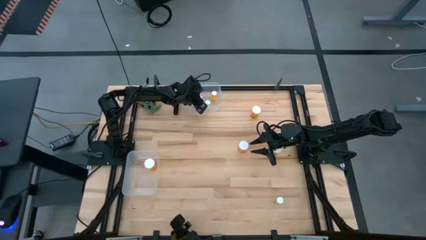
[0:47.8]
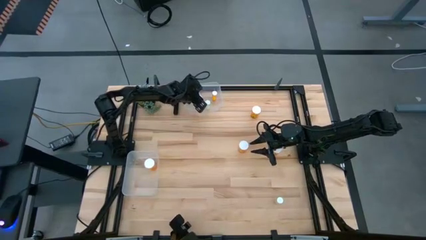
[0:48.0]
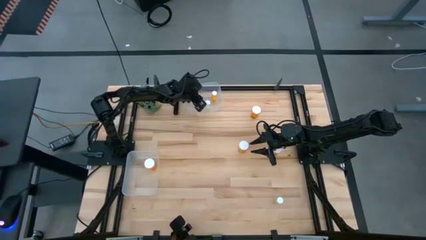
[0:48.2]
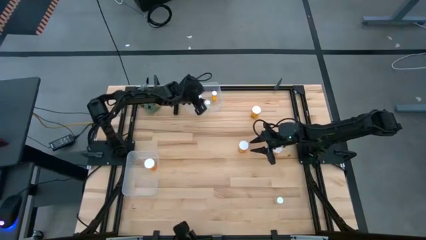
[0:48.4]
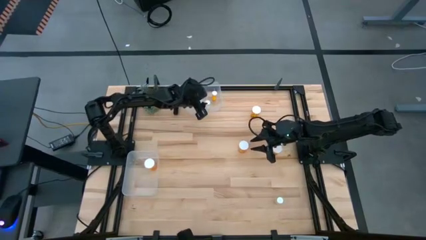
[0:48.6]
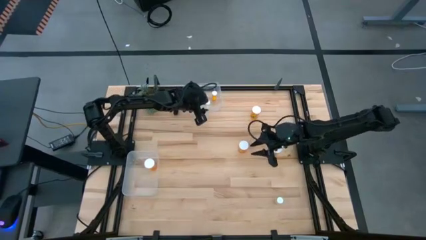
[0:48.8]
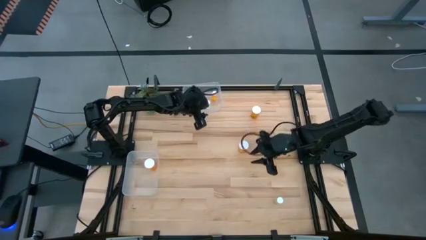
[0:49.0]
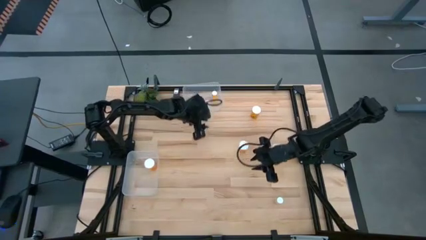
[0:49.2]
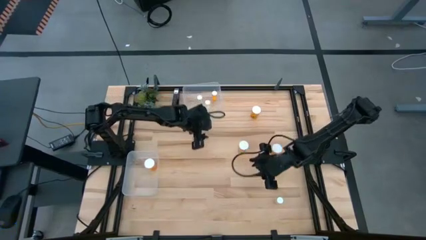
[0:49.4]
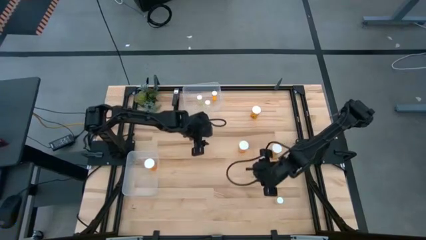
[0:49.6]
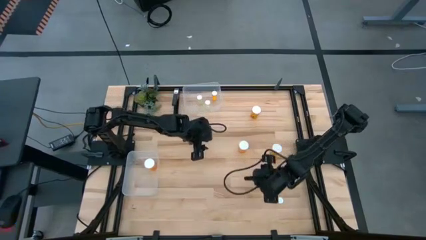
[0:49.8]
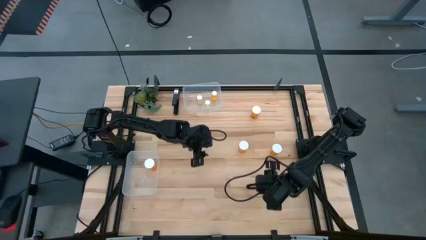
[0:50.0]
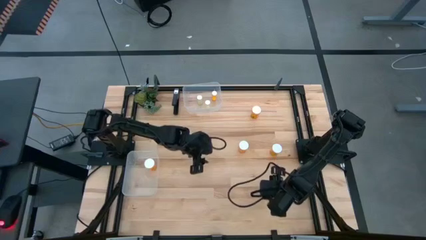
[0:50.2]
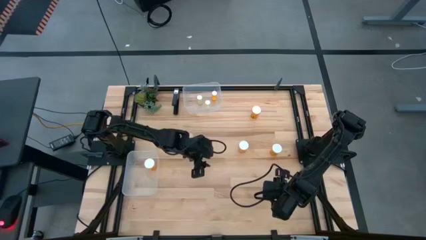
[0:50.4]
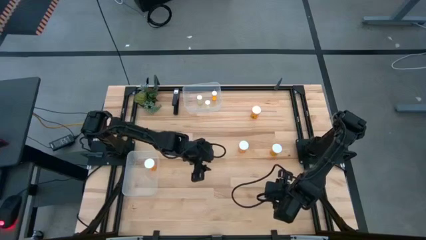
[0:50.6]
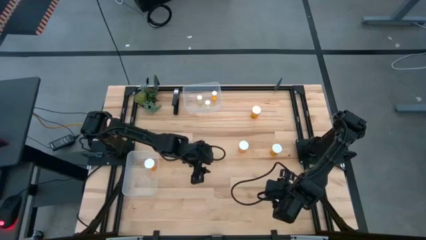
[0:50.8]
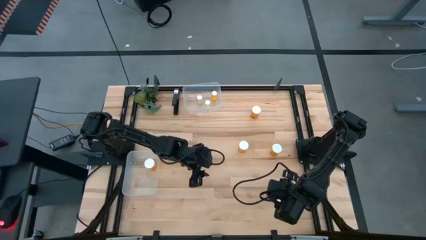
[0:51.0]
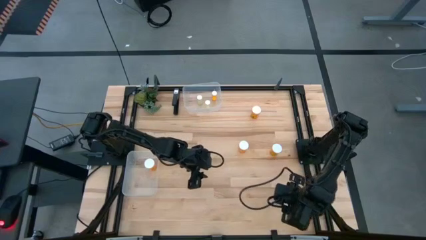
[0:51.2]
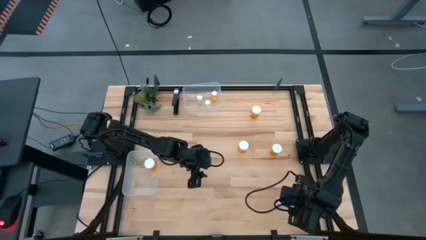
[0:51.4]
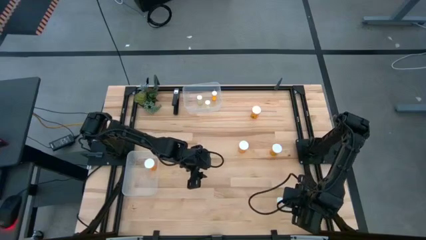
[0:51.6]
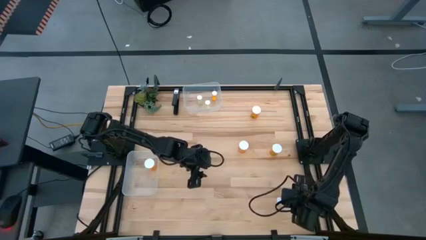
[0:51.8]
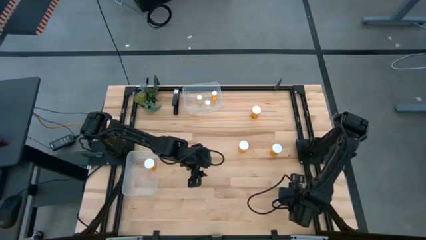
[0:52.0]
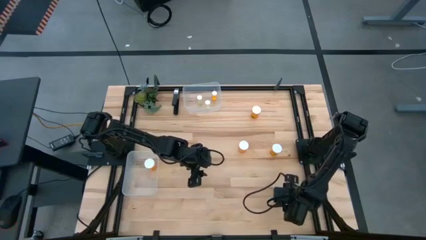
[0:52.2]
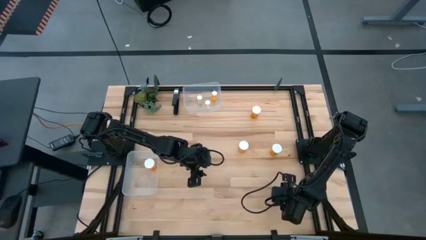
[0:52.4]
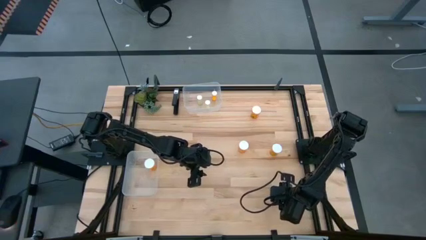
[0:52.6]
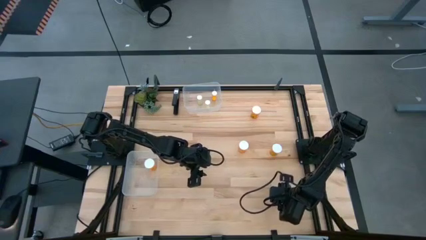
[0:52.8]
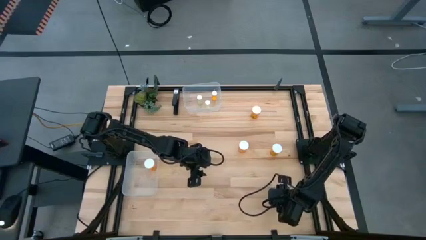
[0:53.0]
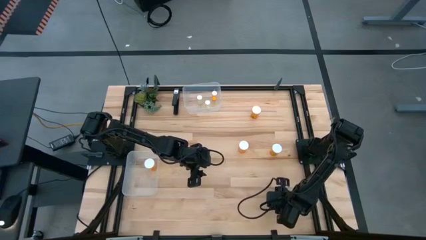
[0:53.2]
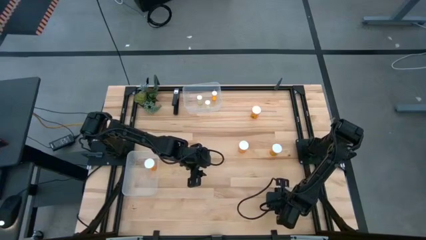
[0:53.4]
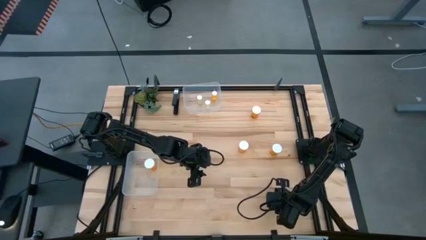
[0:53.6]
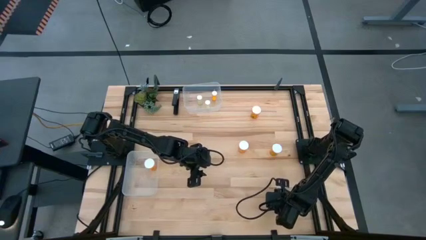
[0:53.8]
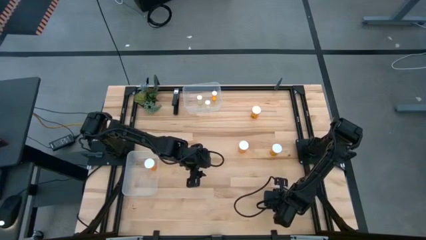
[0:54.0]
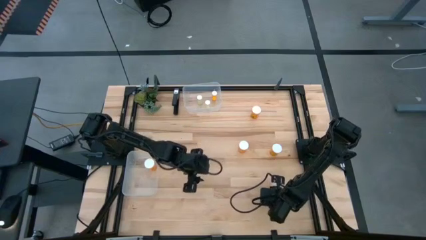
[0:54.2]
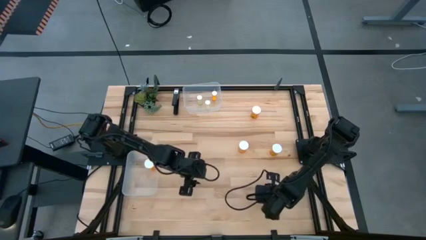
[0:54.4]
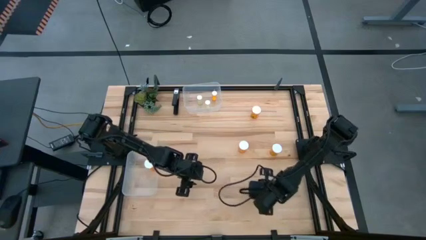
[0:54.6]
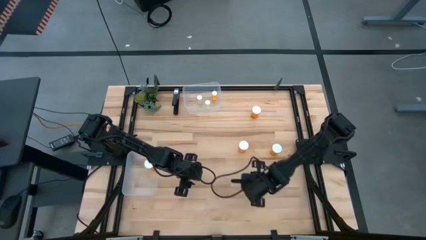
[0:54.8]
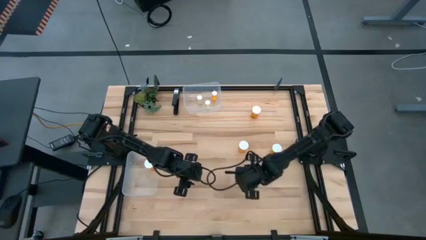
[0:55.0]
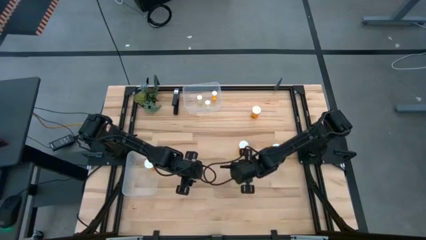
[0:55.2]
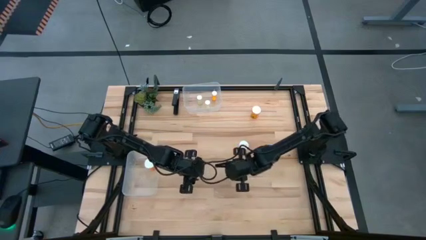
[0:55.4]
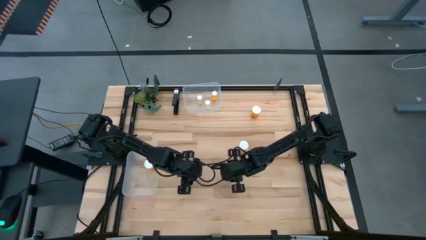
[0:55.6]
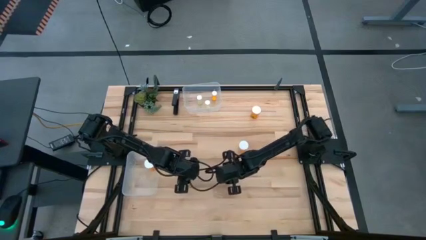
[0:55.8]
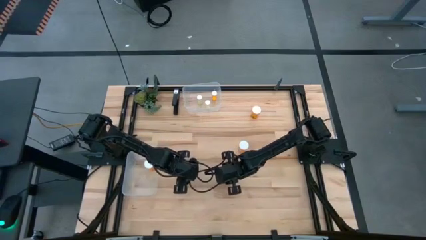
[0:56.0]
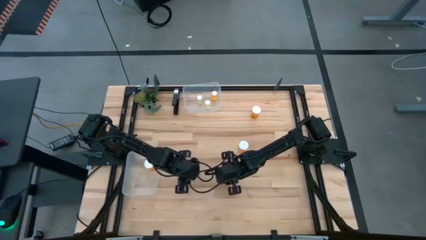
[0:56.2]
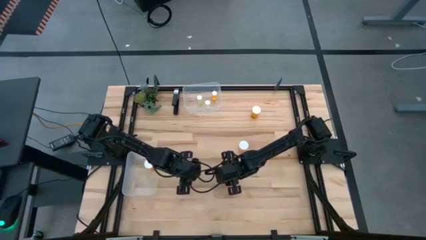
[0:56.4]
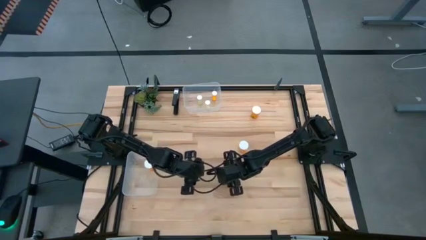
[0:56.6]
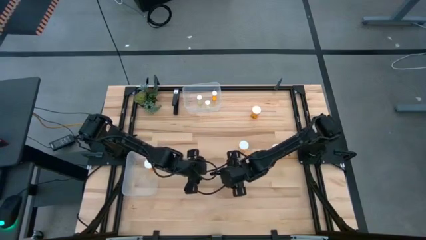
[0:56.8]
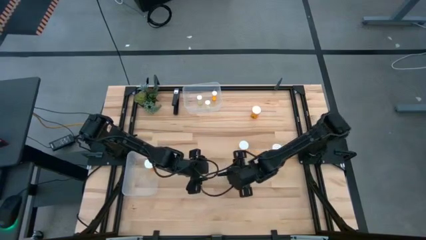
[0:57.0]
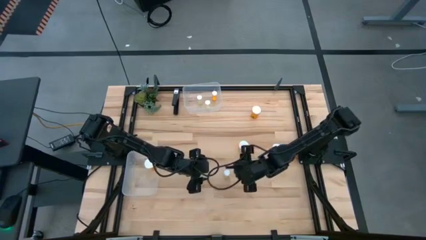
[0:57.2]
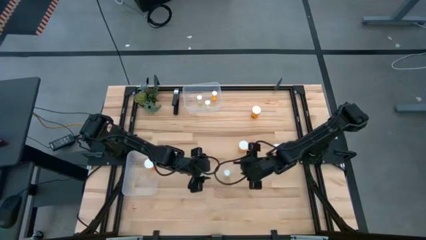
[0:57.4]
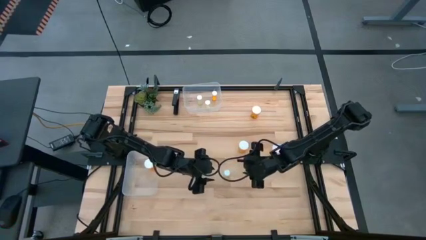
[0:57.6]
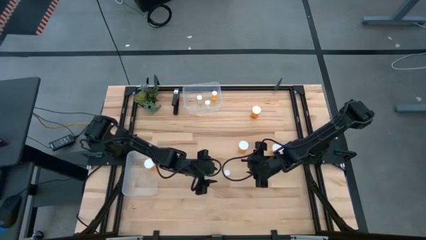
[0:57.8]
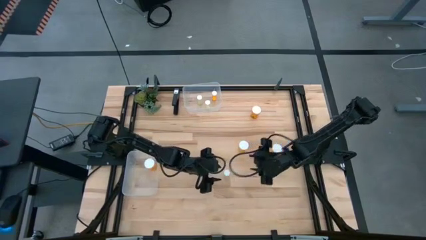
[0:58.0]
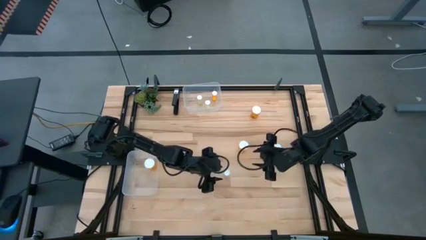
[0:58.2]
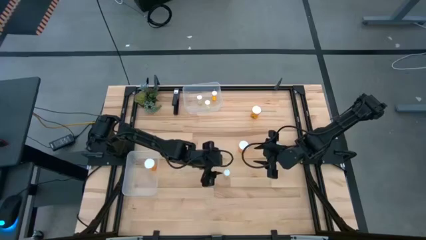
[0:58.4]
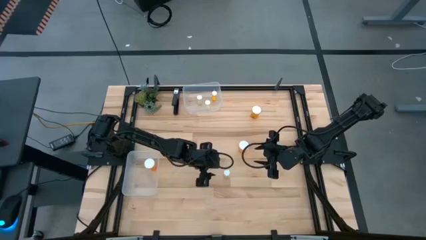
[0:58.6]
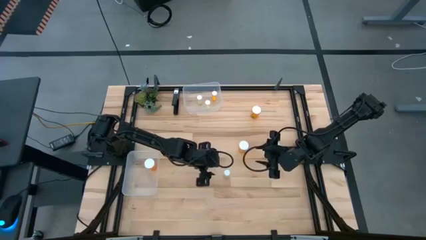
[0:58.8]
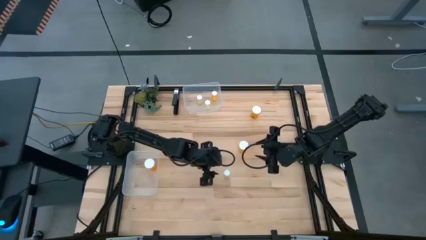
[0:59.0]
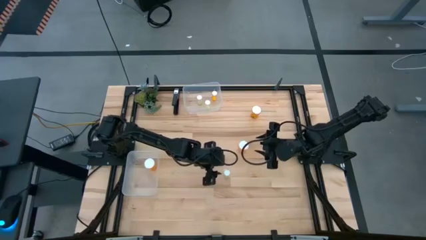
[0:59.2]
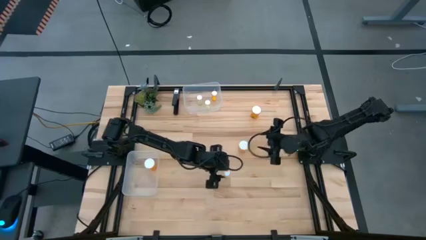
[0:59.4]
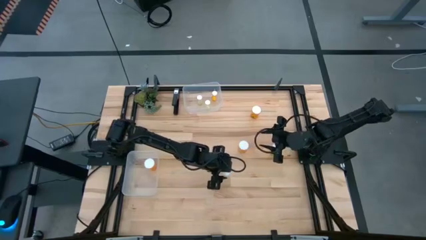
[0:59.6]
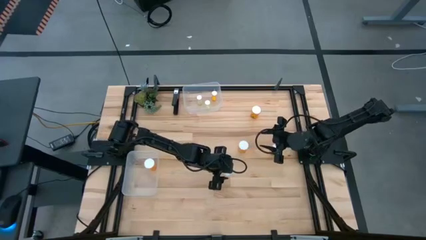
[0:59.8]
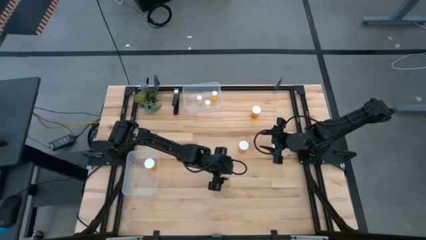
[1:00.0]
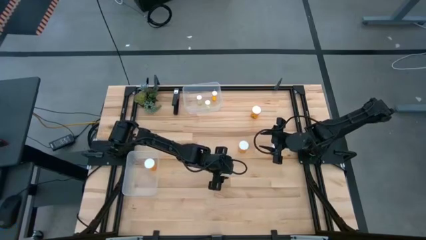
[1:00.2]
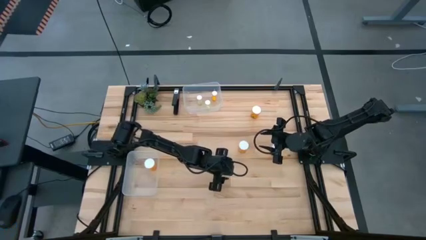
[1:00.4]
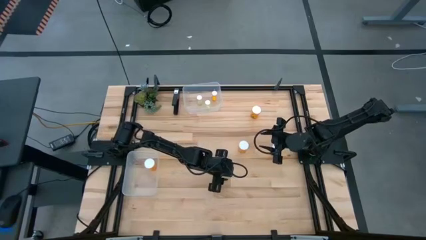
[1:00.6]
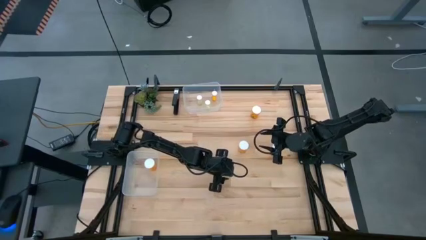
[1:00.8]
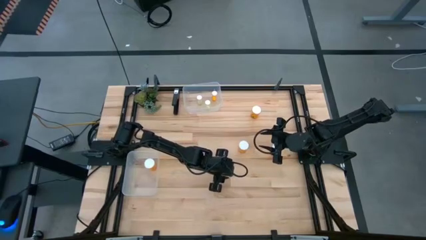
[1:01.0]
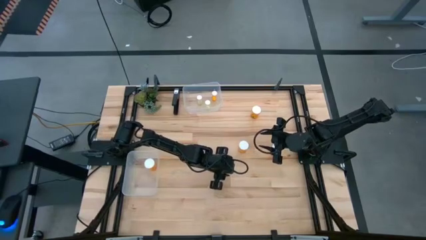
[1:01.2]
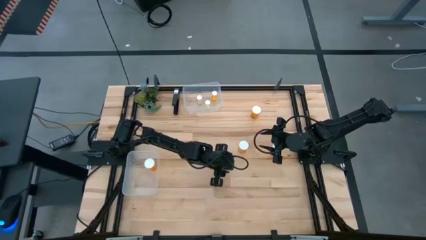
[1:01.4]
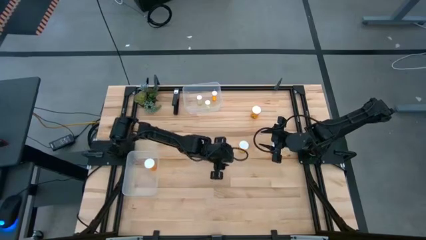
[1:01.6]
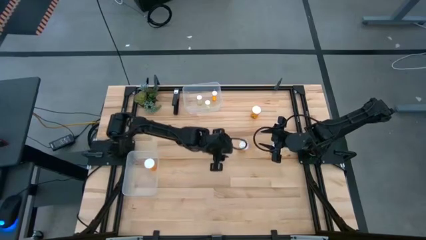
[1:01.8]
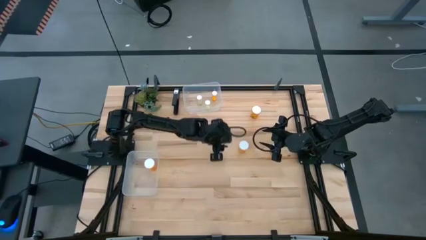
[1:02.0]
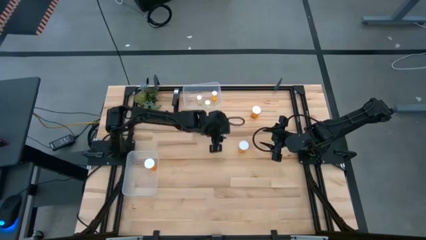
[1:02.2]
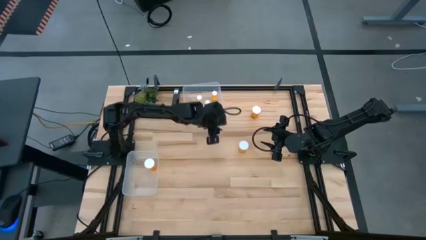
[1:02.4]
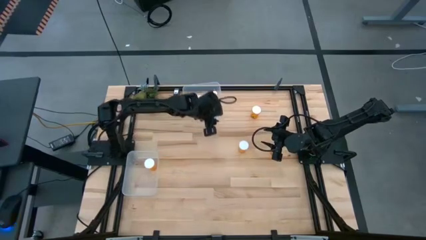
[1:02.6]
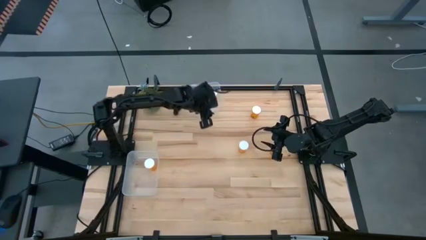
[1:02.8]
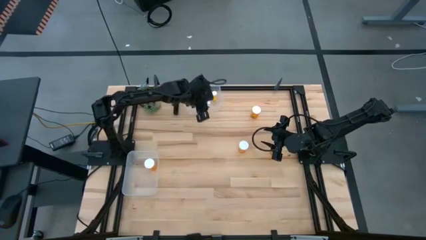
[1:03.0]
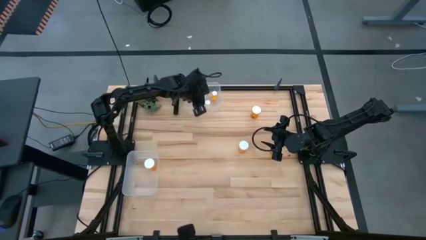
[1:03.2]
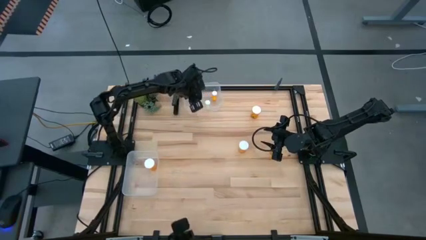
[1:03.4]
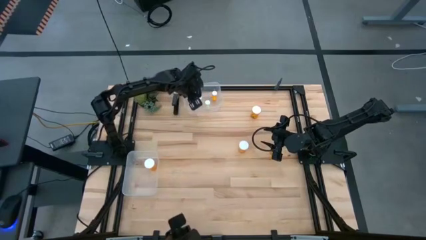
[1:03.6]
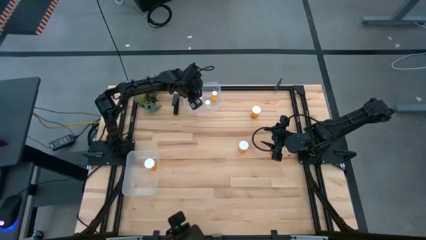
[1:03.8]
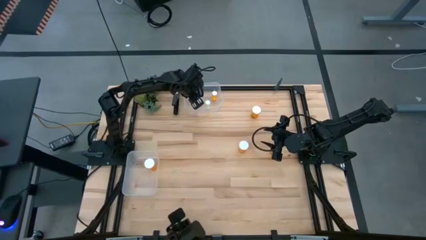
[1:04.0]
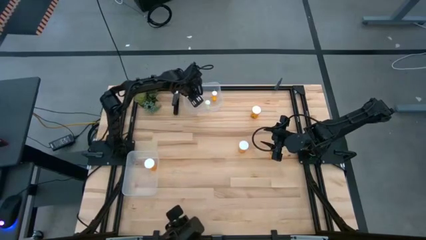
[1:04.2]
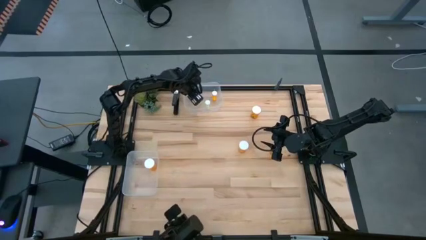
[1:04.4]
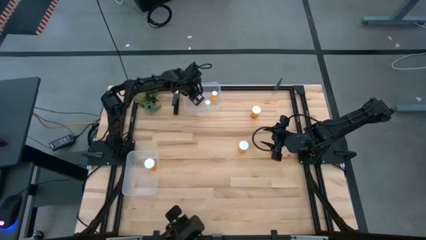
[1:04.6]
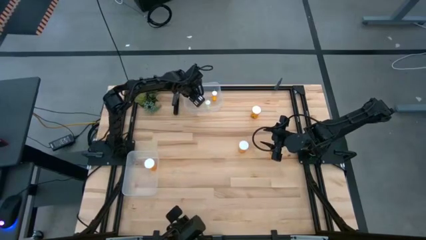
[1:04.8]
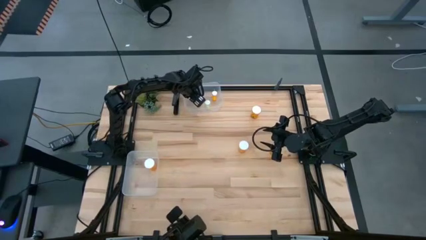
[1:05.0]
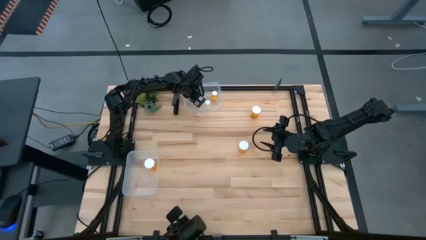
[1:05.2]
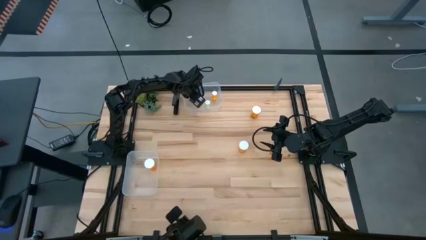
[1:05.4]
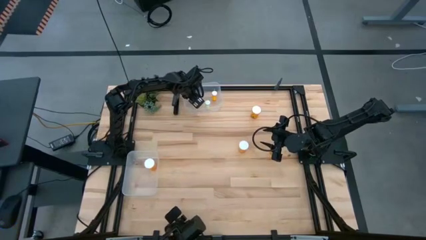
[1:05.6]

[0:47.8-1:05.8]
Task: Pick and place medicine bottles into bin by pill shape (circle, oval)
Put the small yellow pill bottle into the top transparent bin
